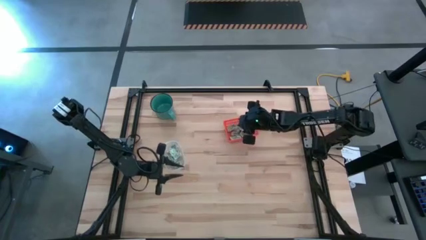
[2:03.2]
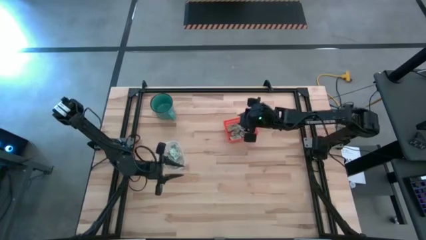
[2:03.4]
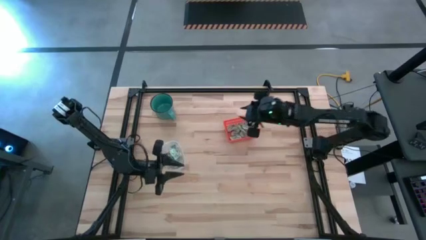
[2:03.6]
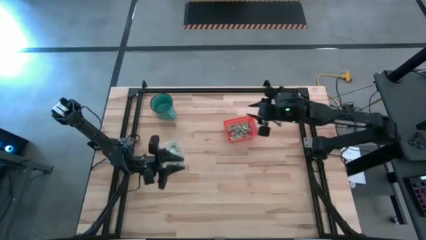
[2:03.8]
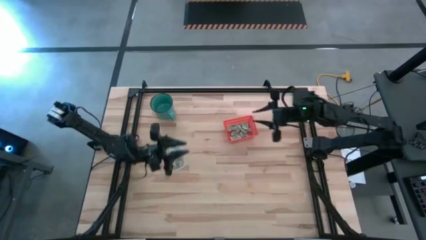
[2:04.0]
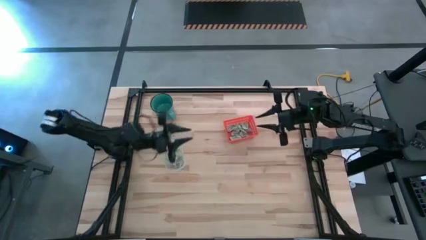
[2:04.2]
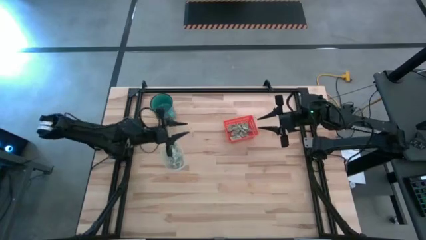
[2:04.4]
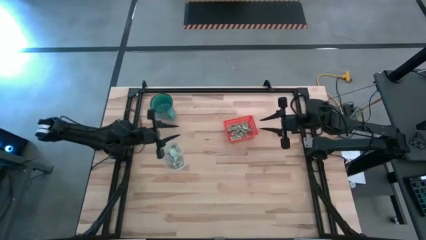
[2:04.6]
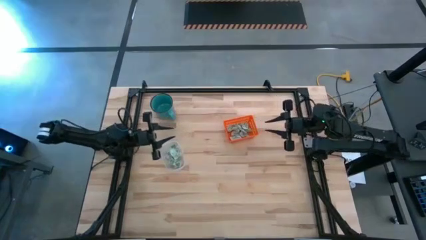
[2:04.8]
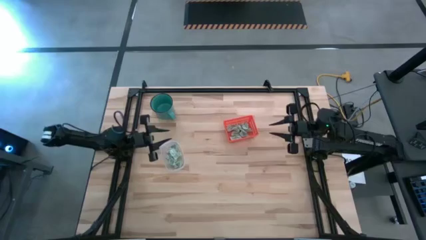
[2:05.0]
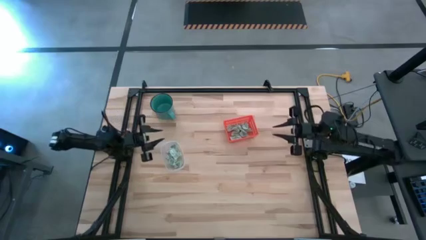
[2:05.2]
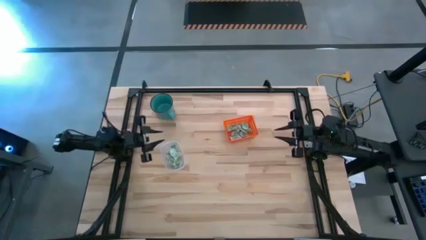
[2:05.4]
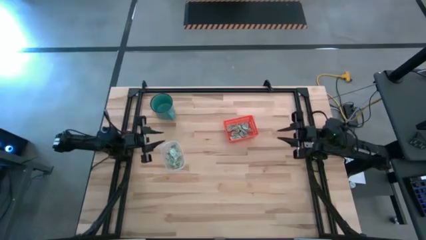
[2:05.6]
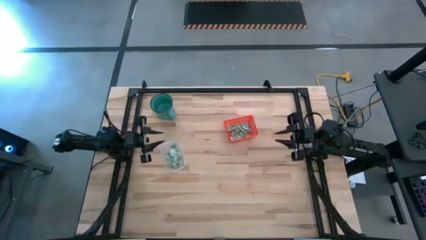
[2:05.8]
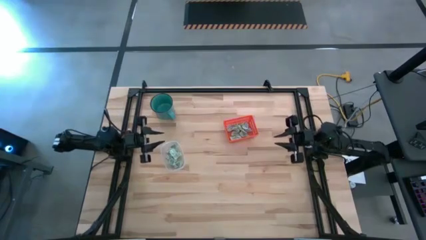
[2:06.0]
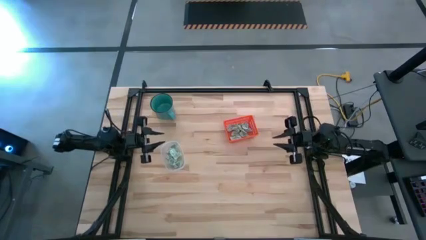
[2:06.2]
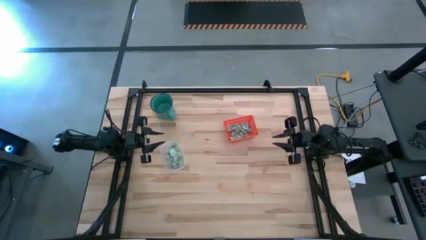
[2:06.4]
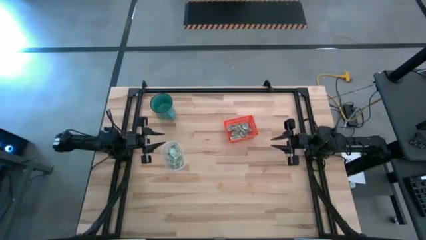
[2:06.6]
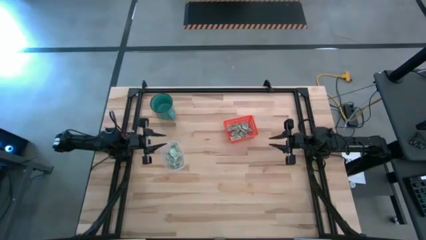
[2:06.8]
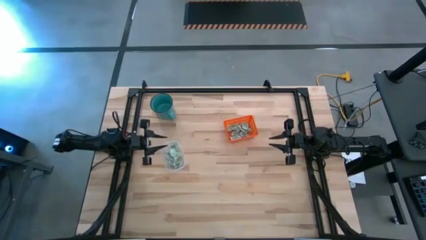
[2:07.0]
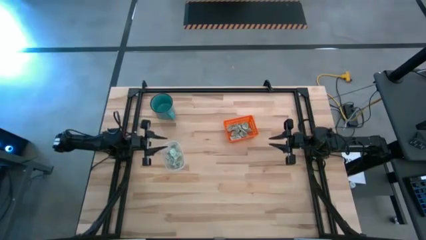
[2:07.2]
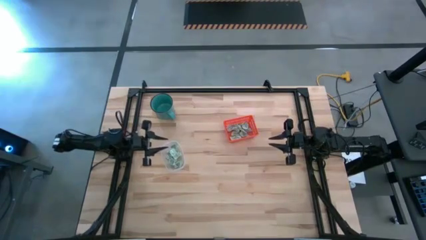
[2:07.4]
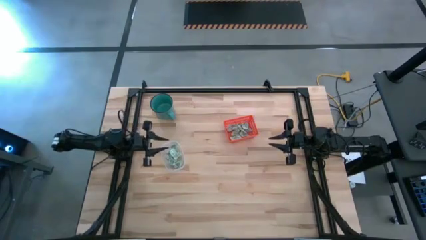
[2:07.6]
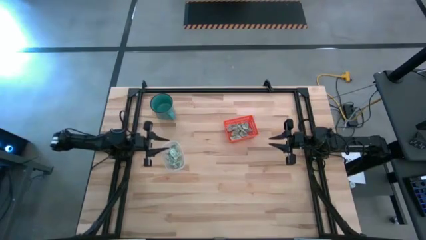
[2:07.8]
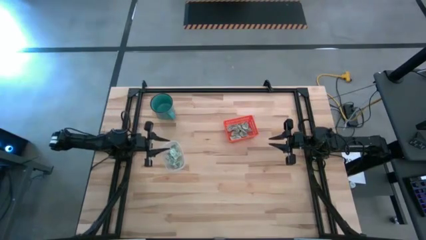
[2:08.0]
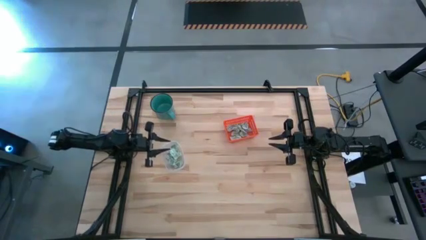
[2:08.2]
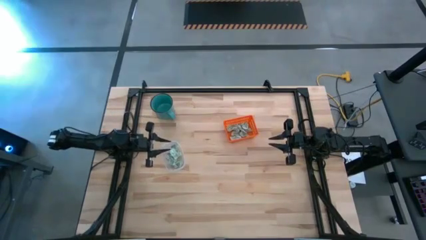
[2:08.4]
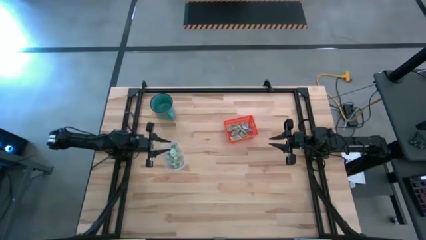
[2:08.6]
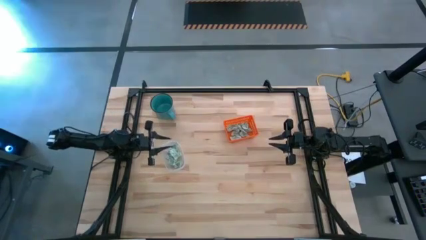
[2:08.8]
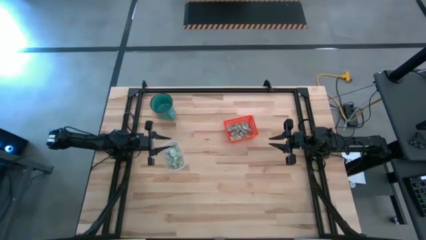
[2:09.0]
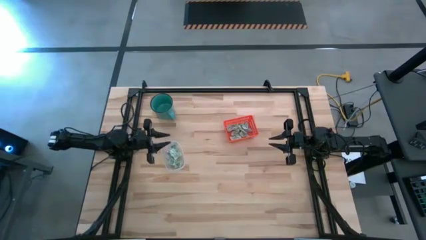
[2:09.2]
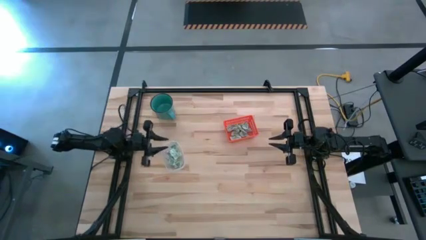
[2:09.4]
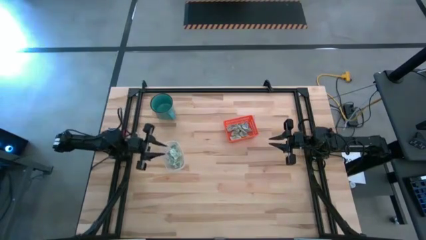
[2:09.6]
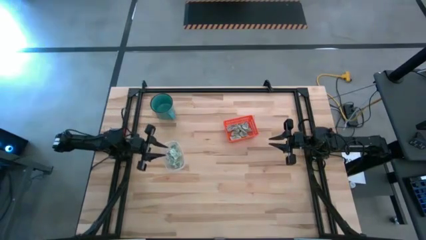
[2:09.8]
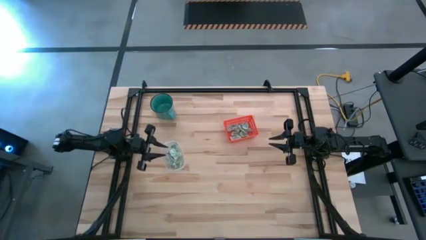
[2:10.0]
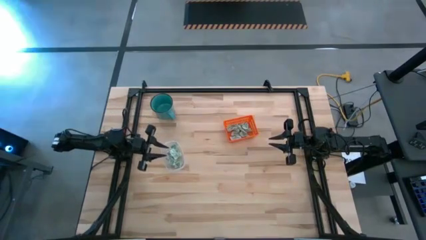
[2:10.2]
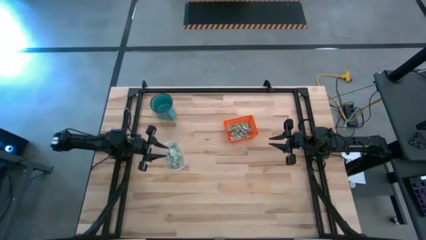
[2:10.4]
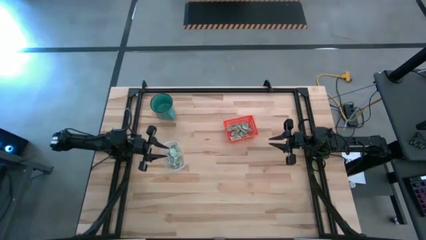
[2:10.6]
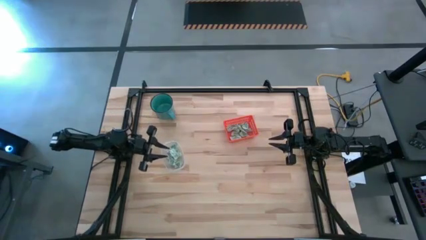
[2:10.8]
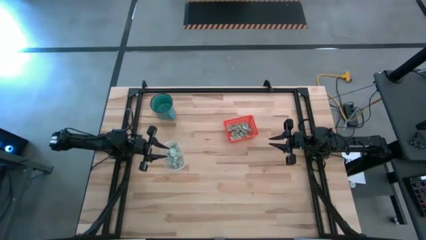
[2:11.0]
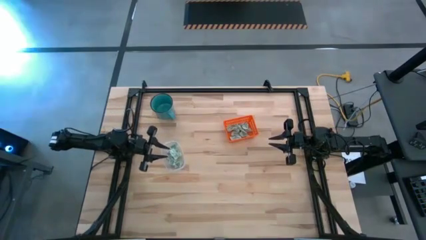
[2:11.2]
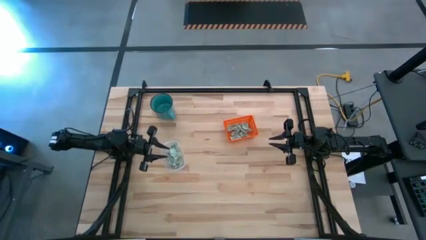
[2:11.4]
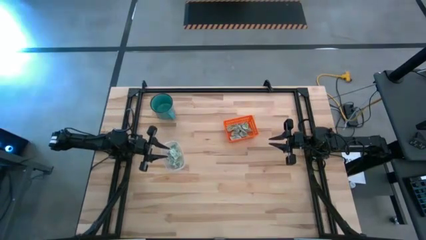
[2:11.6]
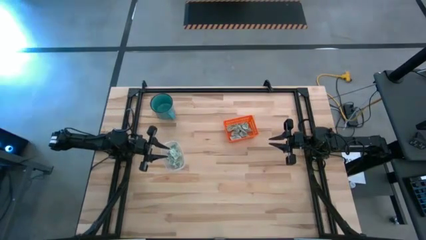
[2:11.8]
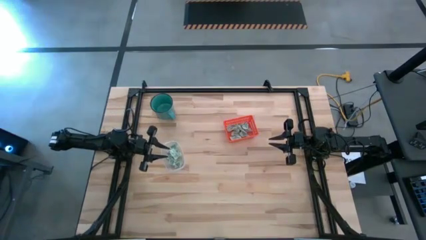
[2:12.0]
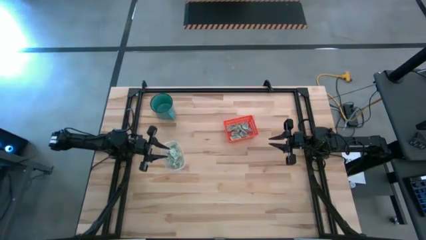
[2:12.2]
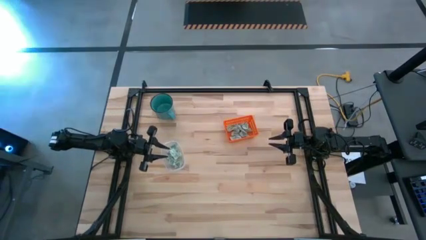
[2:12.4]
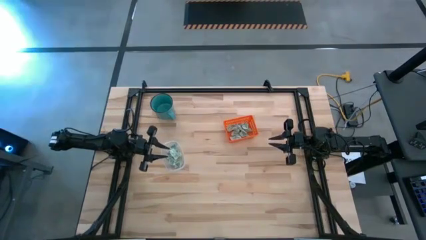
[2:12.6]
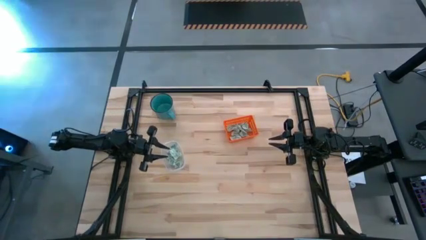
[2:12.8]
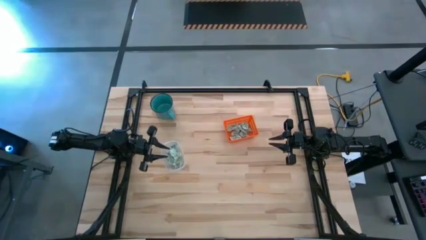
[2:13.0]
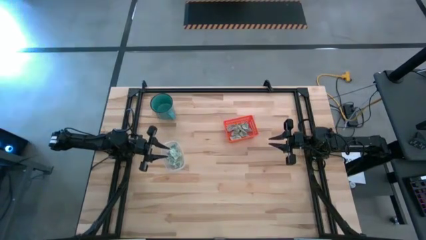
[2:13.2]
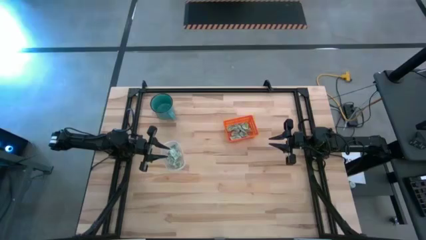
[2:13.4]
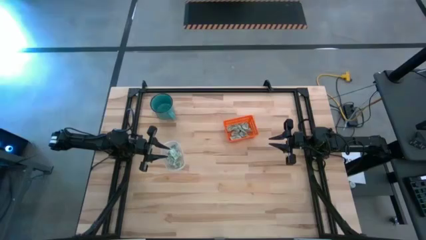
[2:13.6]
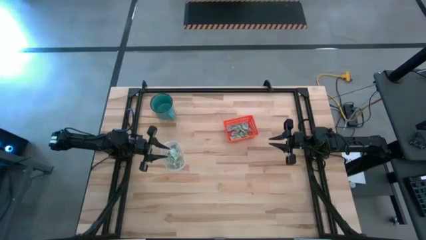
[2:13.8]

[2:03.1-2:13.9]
Task: Pick and place items into bin
Return to Home Position
